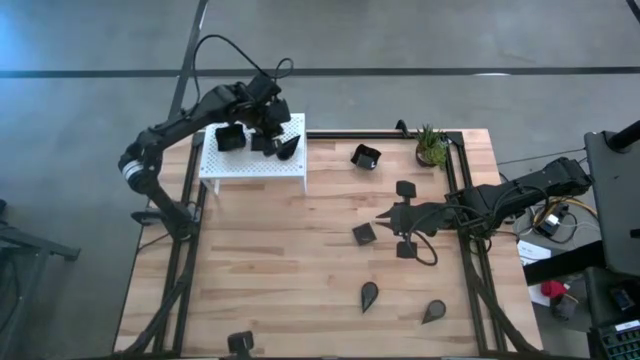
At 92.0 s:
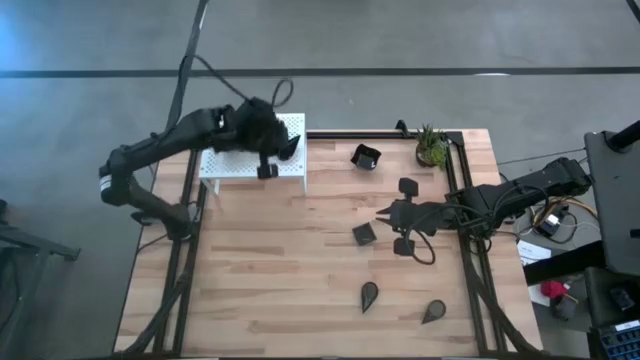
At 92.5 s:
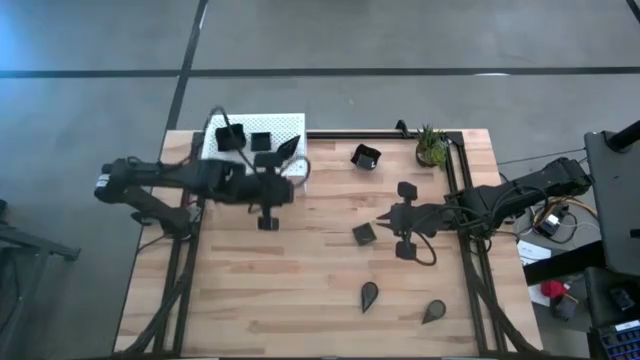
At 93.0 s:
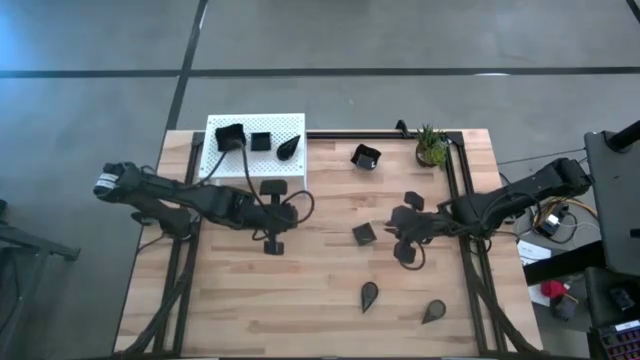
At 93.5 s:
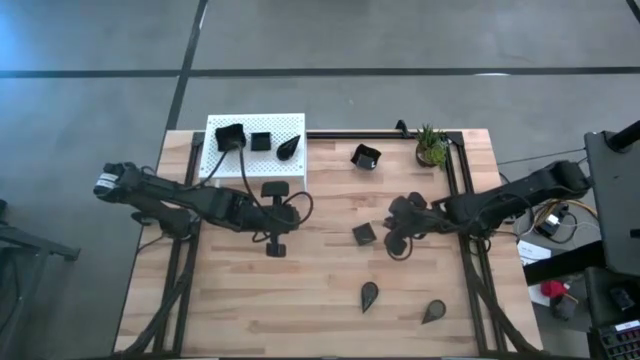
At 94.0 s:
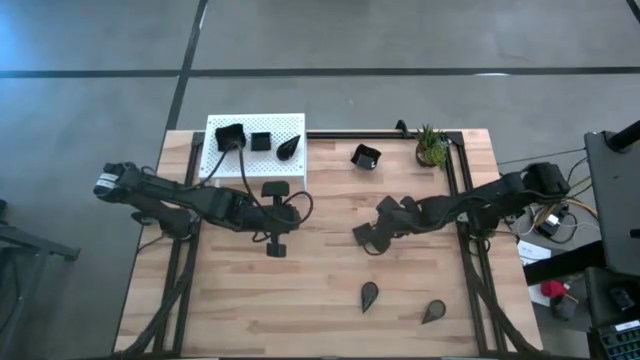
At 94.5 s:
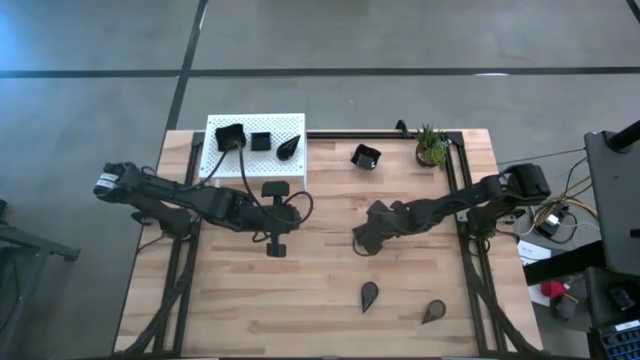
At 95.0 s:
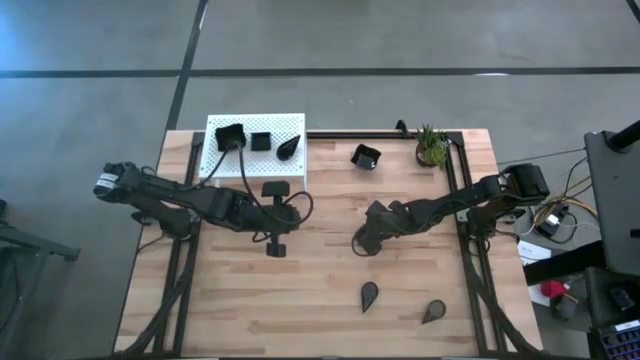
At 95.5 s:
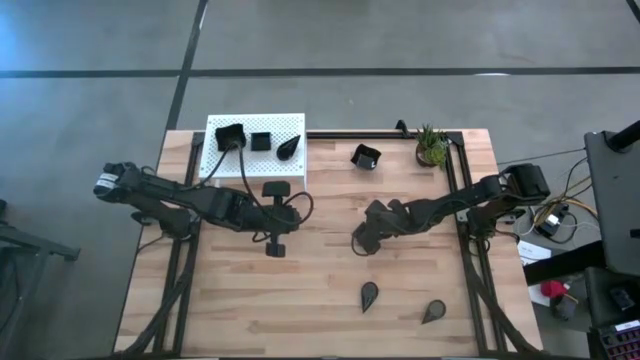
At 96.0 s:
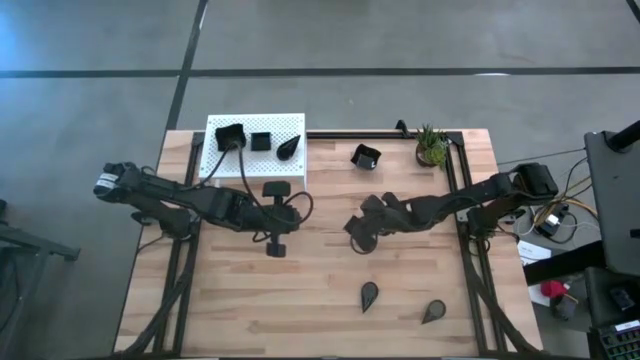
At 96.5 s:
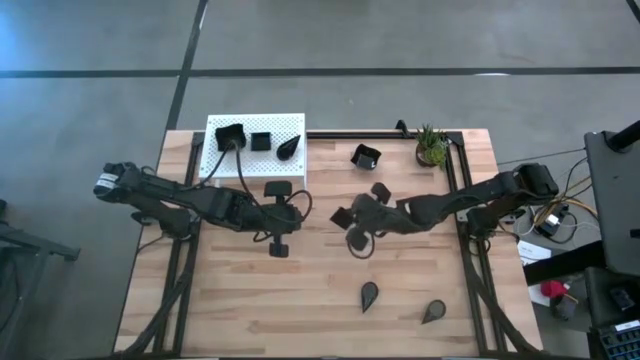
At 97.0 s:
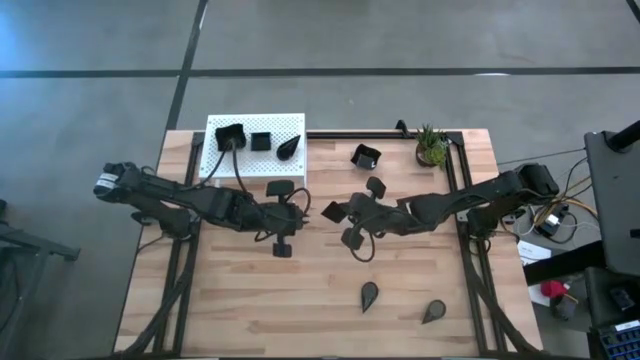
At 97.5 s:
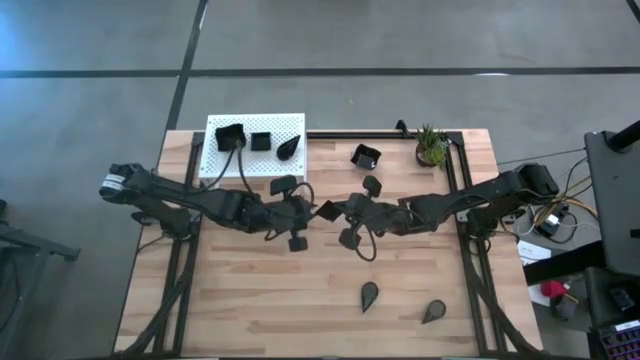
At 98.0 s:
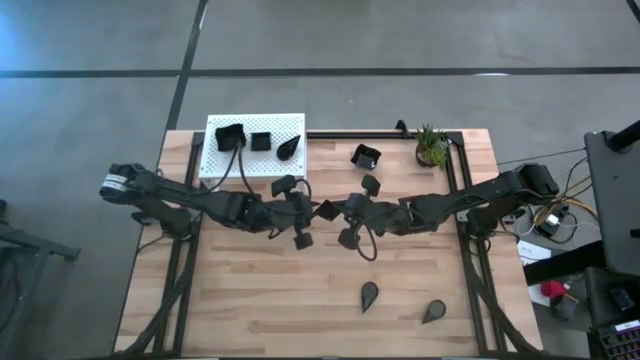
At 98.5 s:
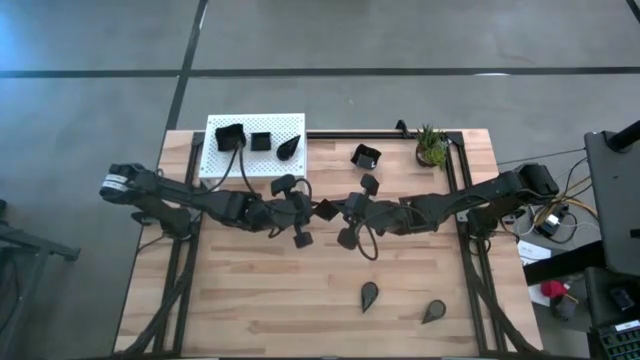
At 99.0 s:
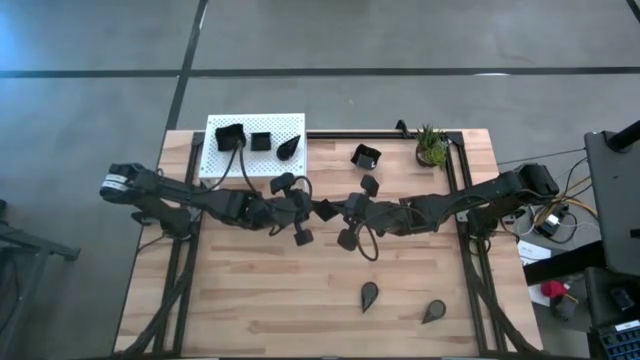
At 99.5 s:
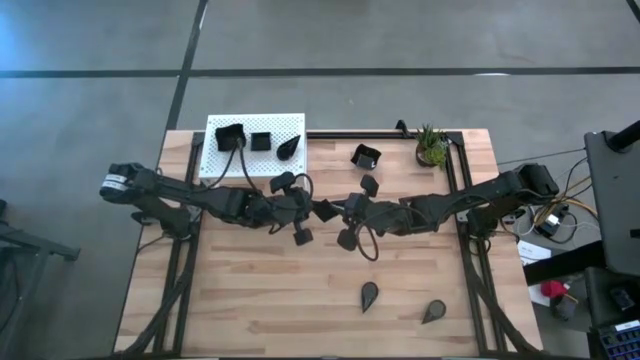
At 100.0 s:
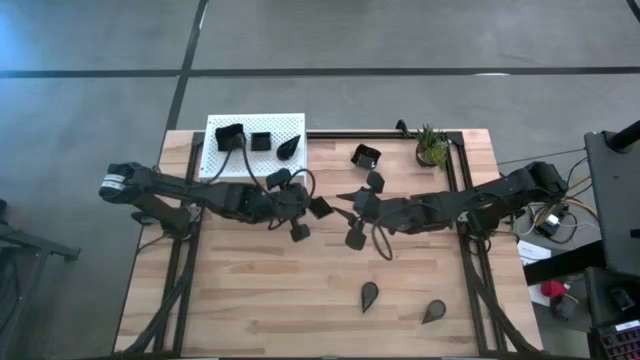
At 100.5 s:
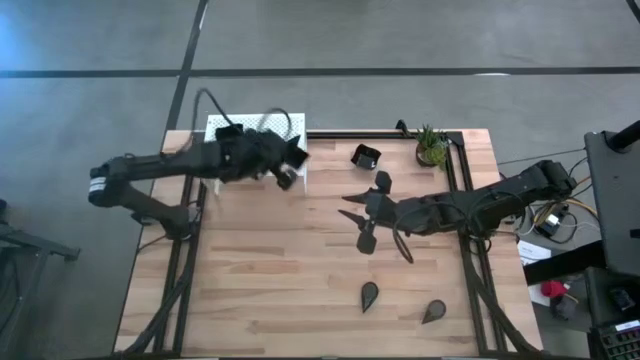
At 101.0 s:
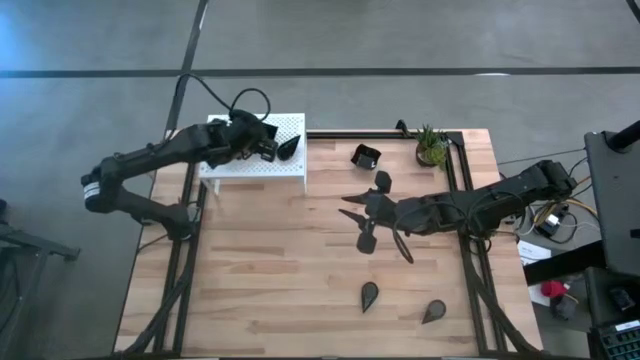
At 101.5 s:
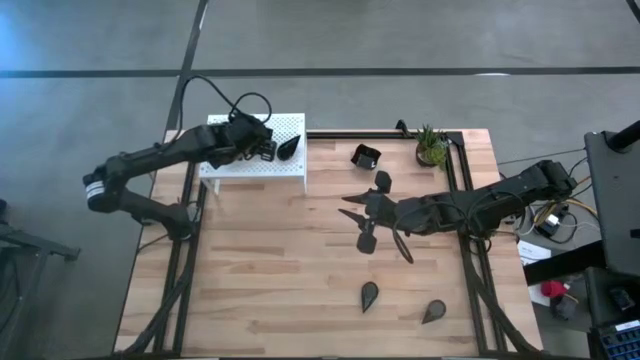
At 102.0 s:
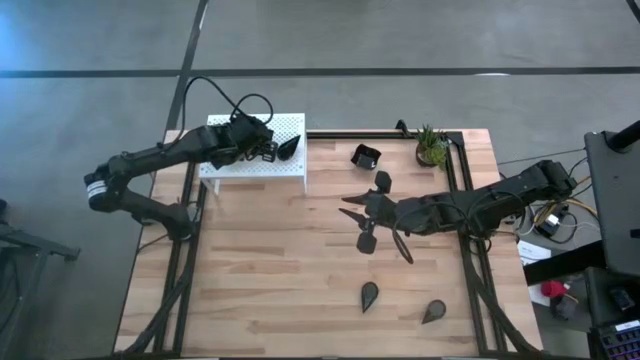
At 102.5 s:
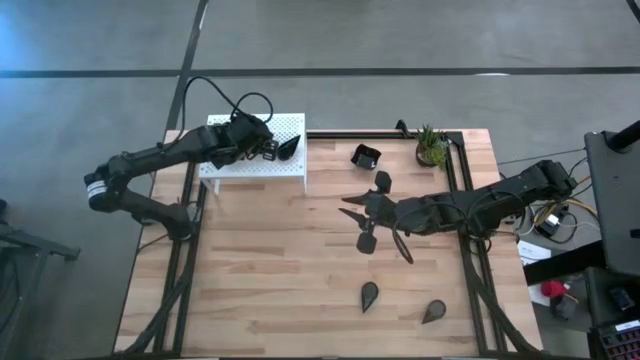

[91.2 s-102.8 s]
Task: Pick & Place Mini shaped plates
Stack the square plate on top of the other square plate on the shelf
